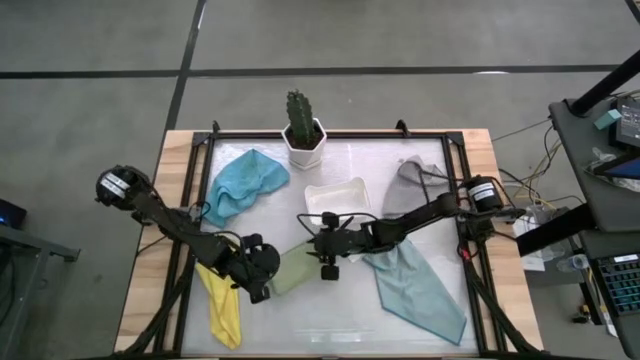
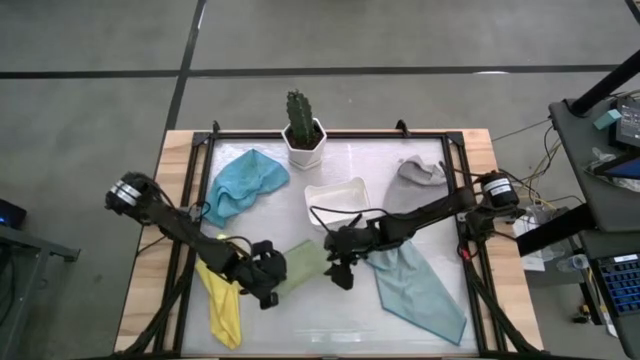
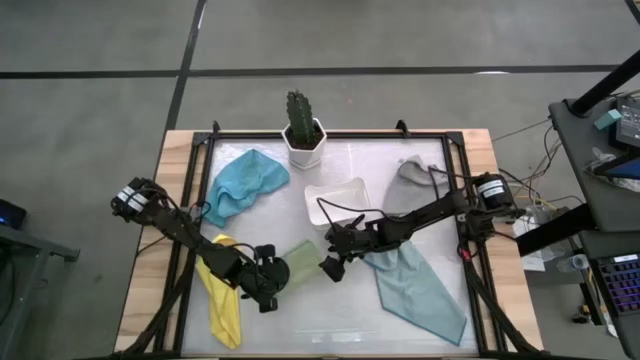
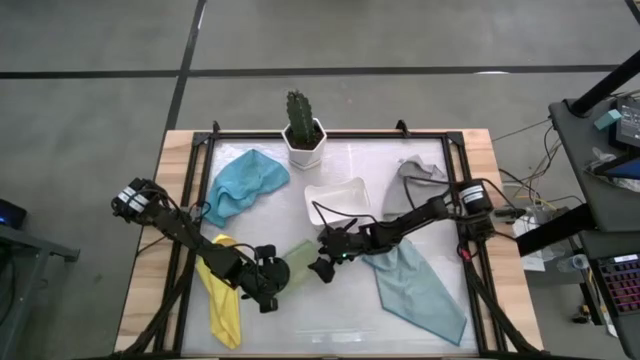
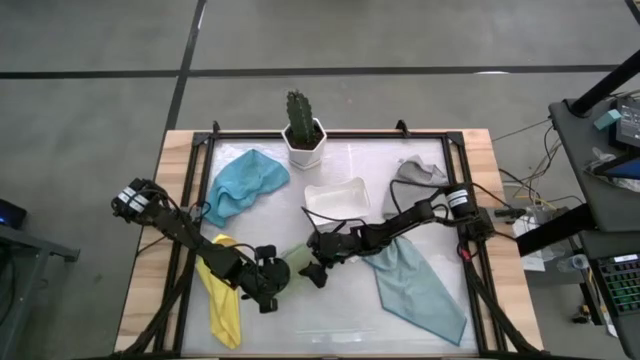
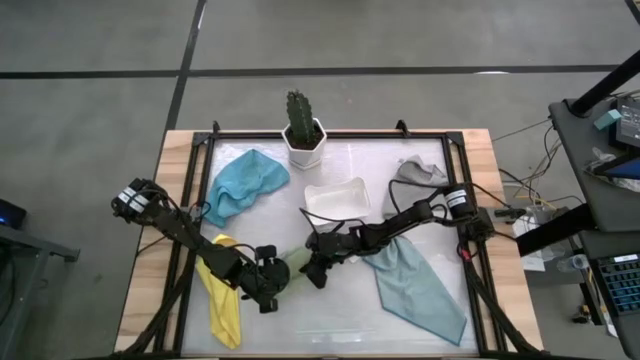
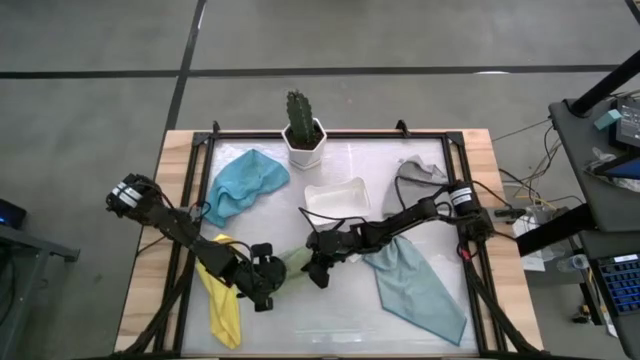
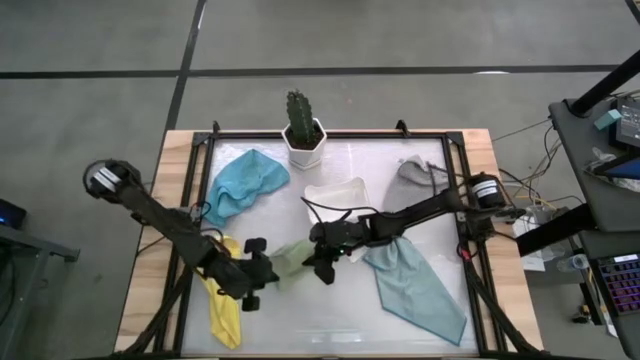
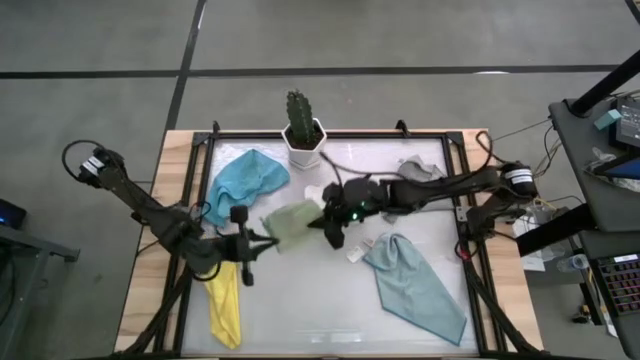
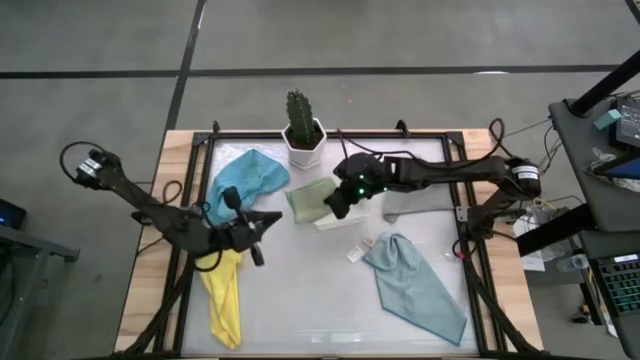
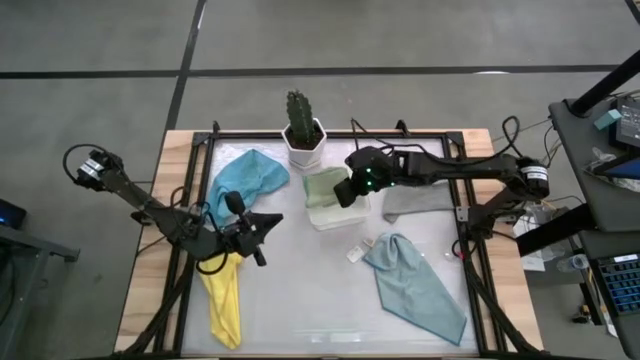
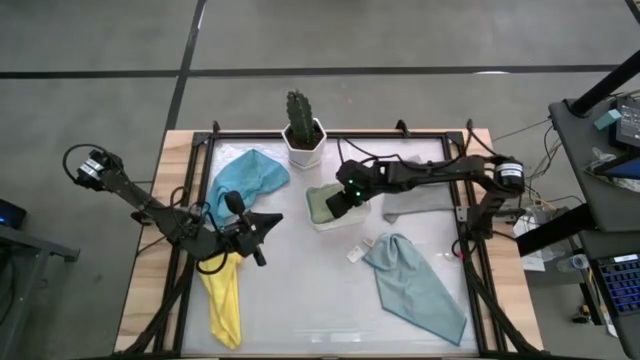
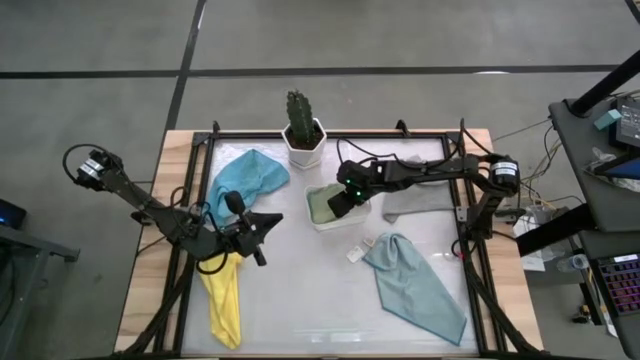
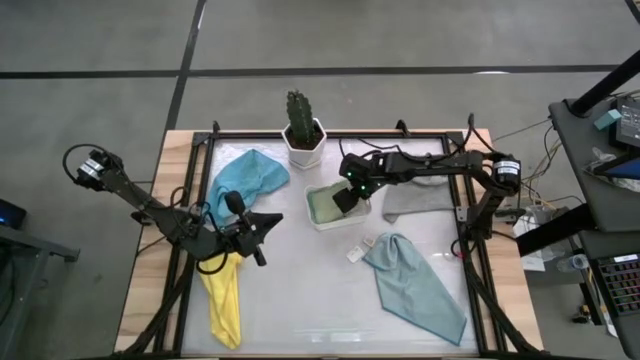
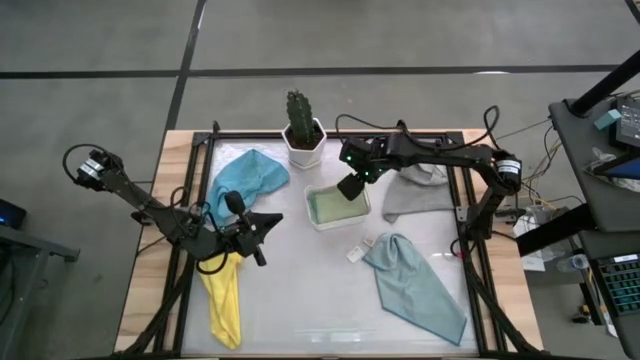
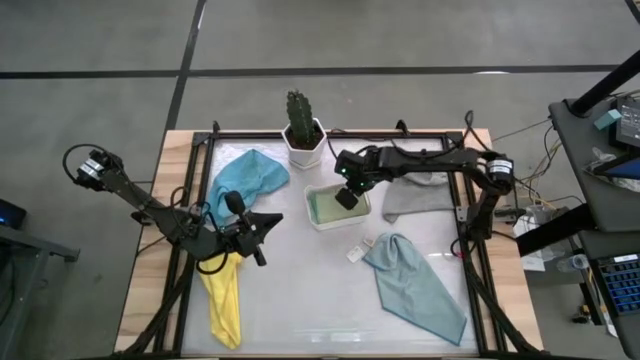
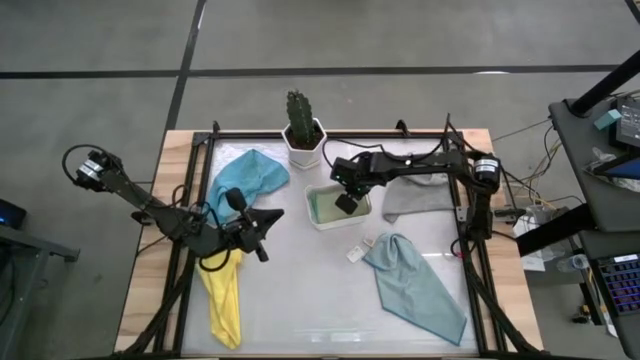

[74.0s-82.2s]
Task: Fold microfiber towels
Put the green towel into the bin

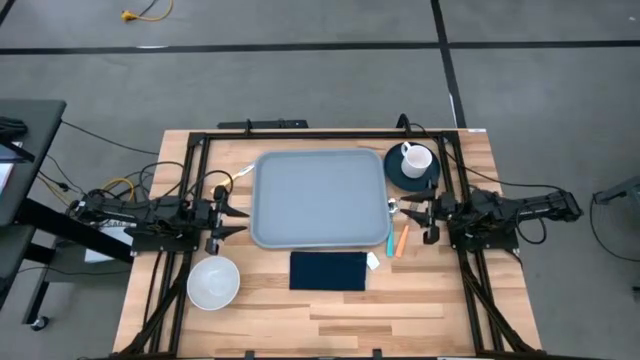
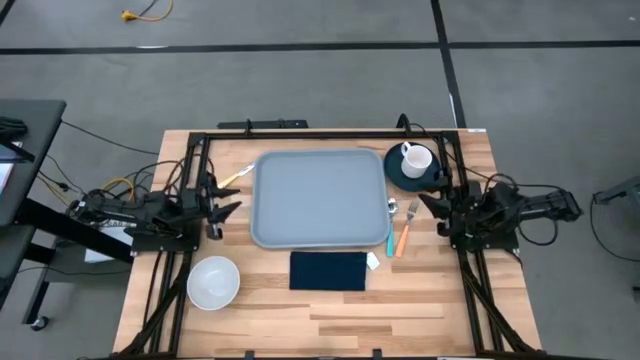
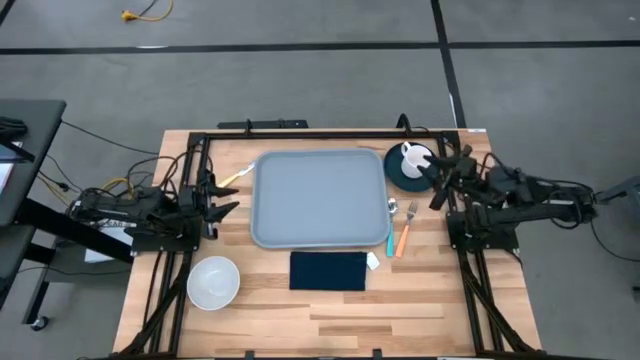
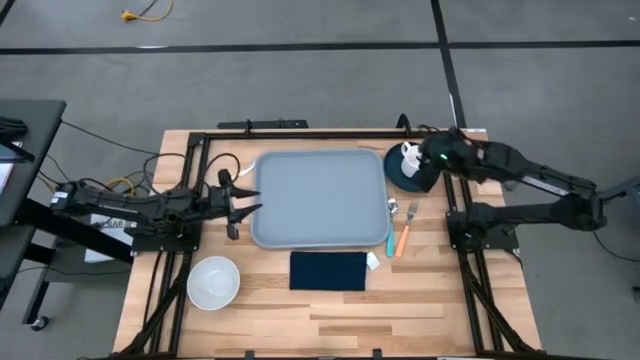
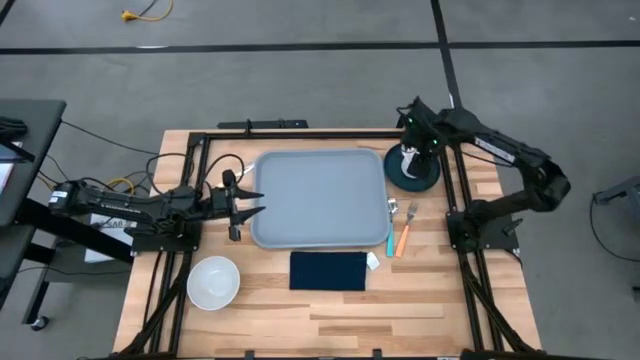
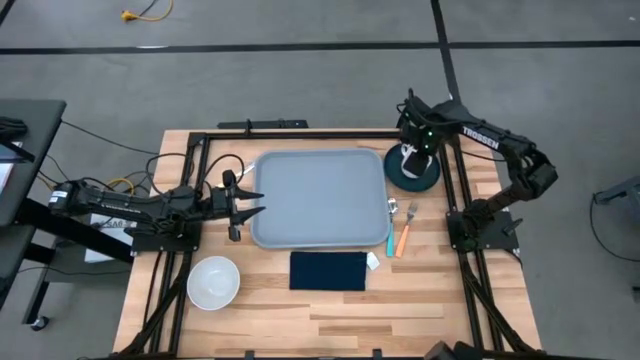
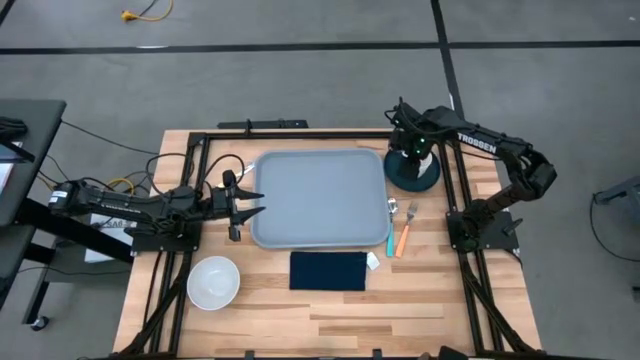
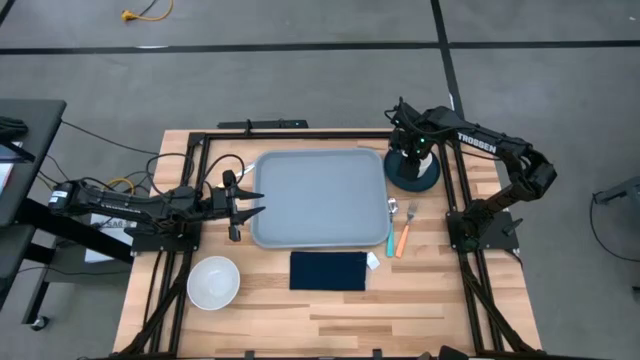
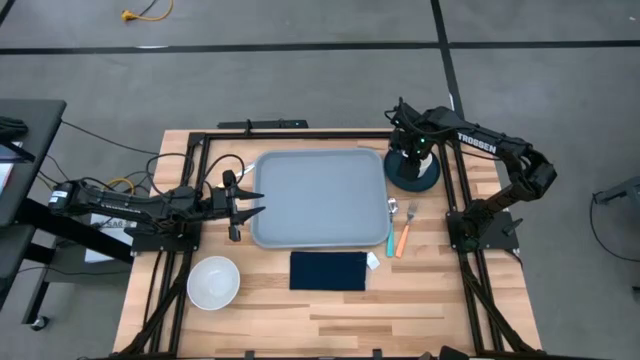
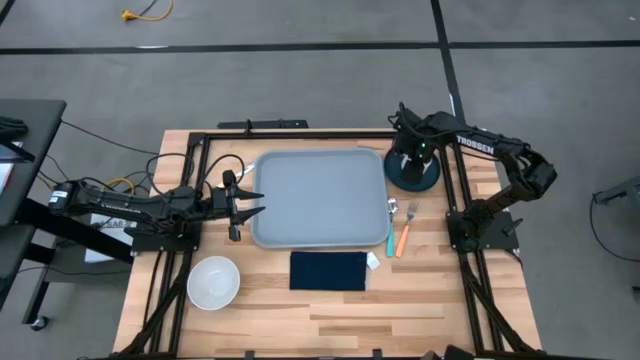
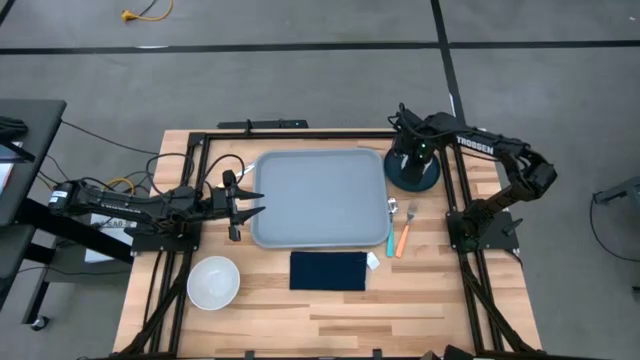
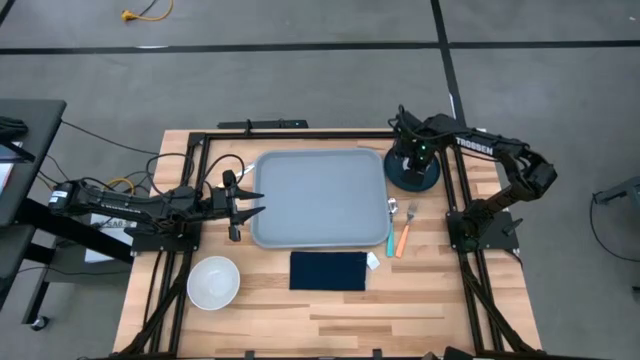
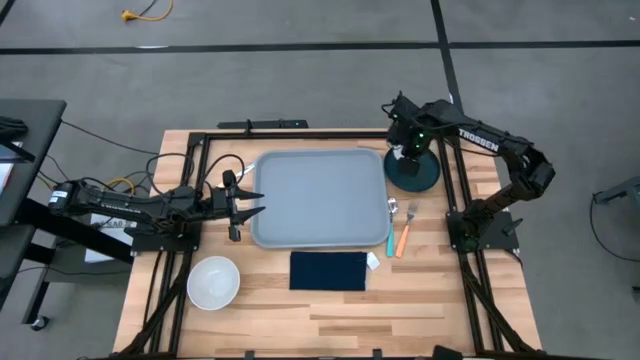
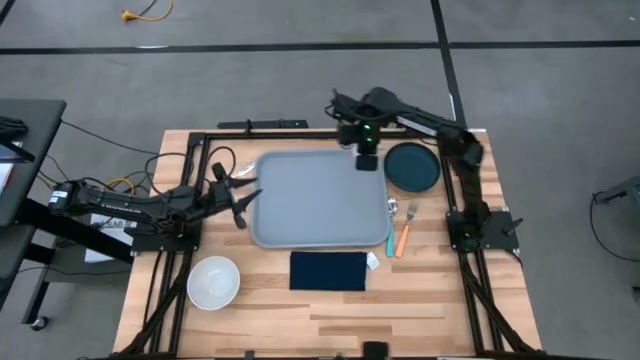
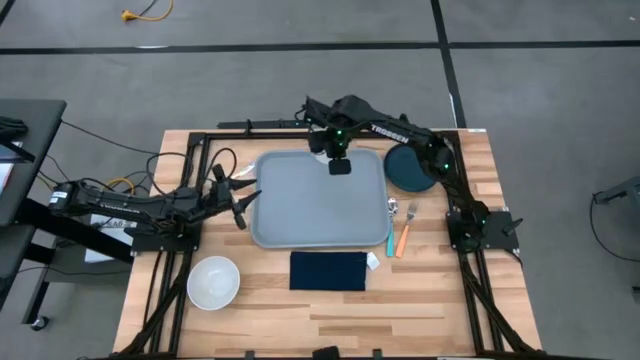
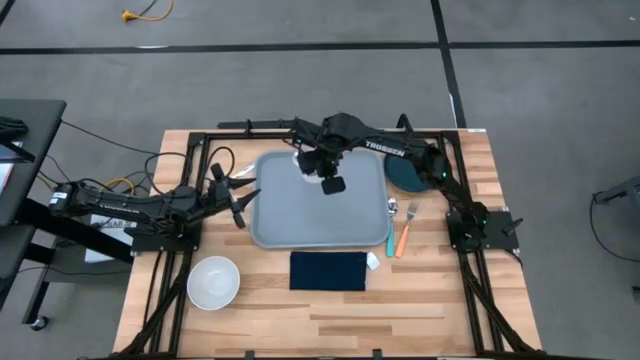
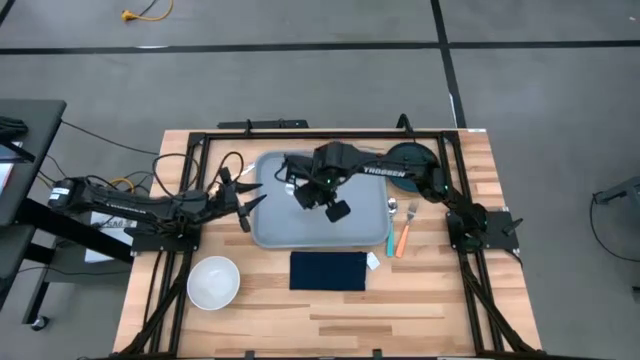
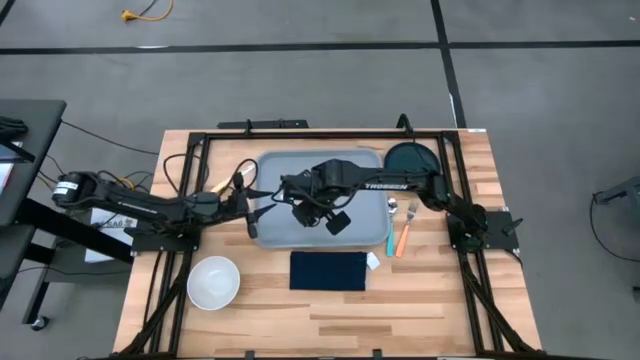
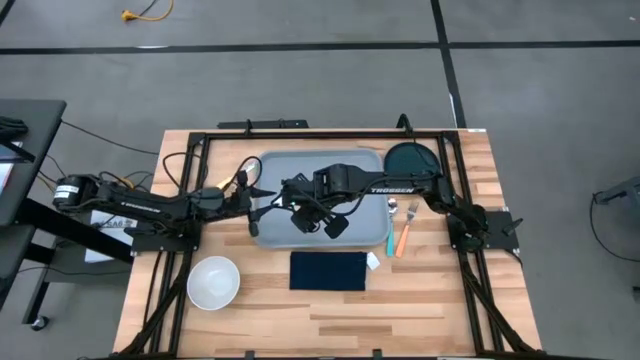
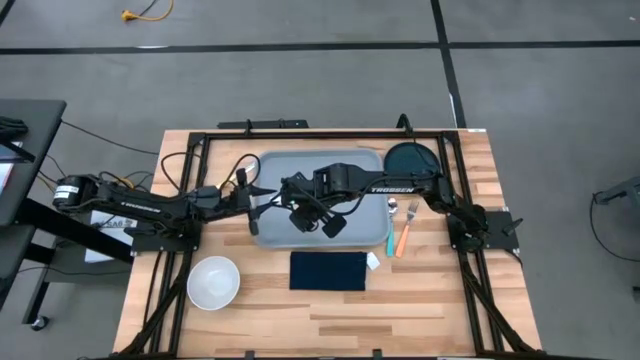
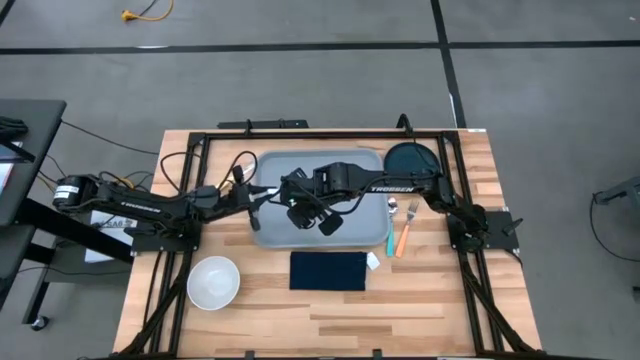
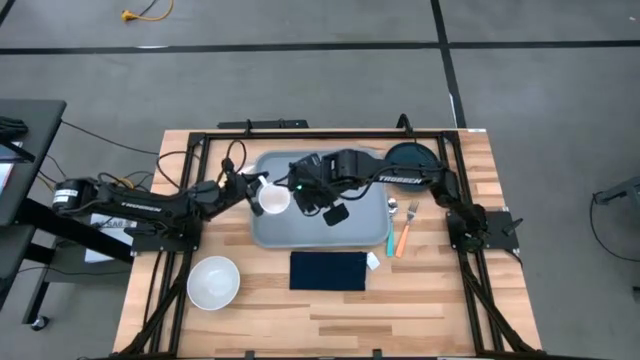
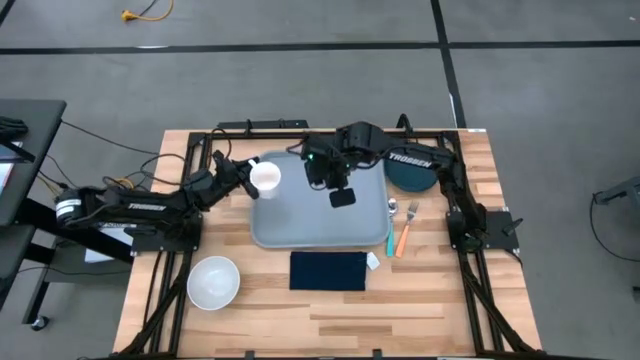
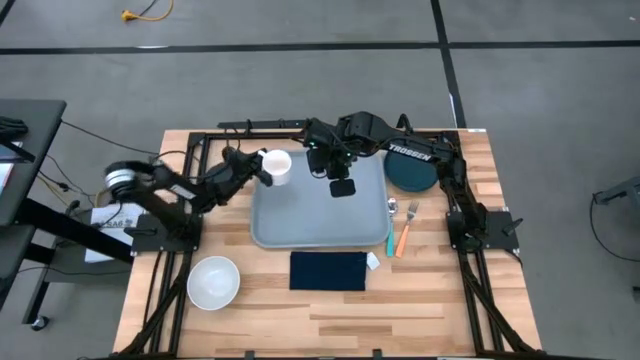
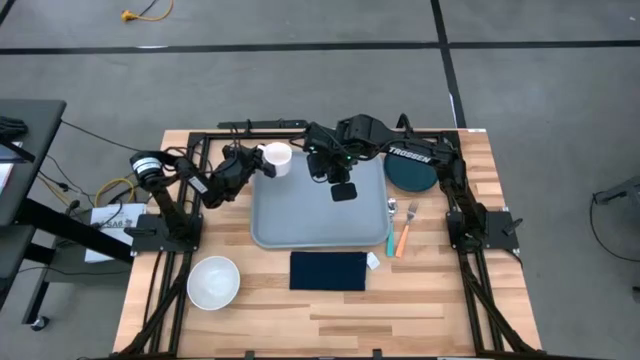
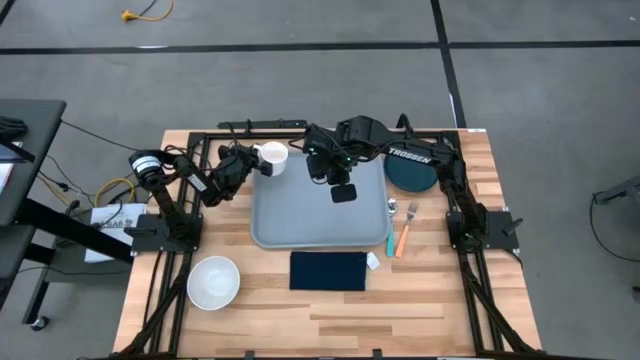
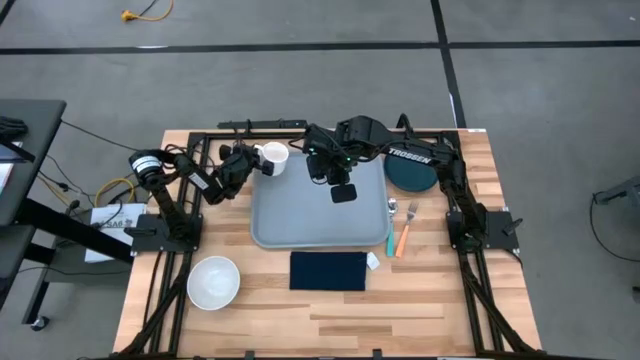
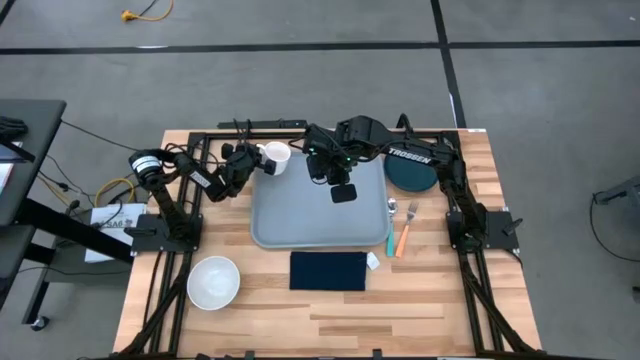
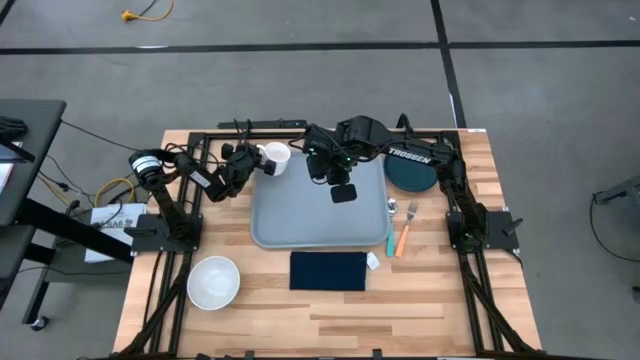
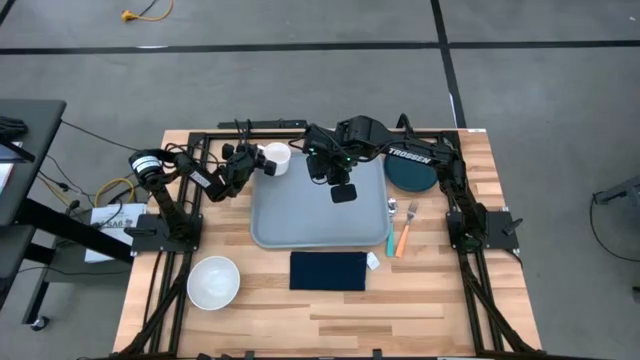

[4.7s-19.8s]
Task: Set up tray
Put the white mug on the top left of the gray tray
